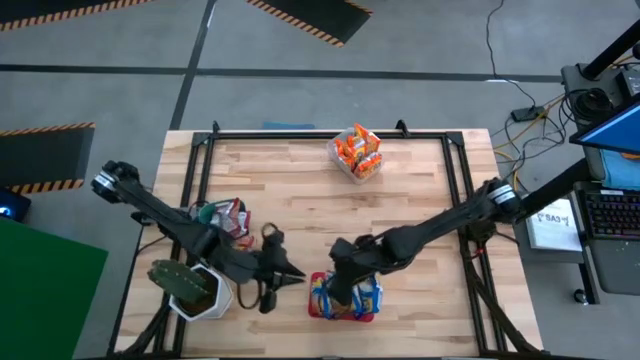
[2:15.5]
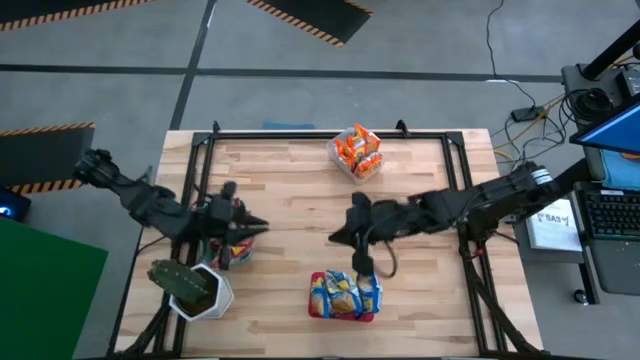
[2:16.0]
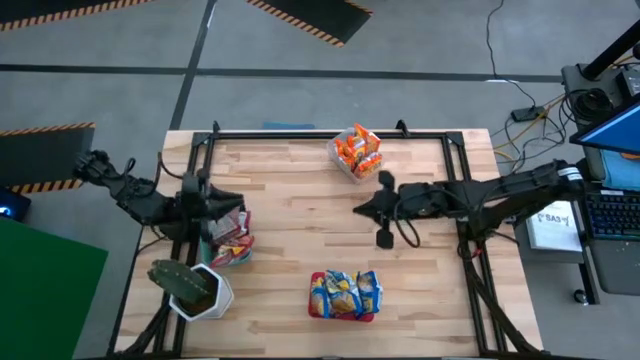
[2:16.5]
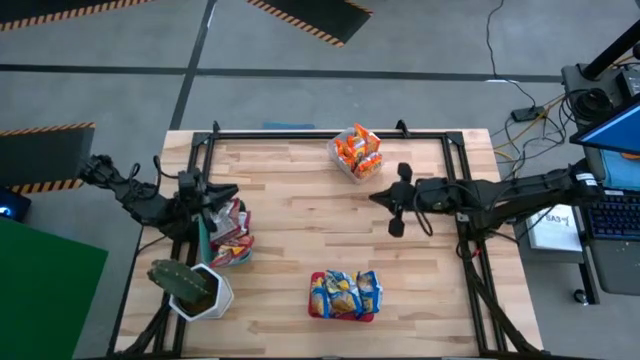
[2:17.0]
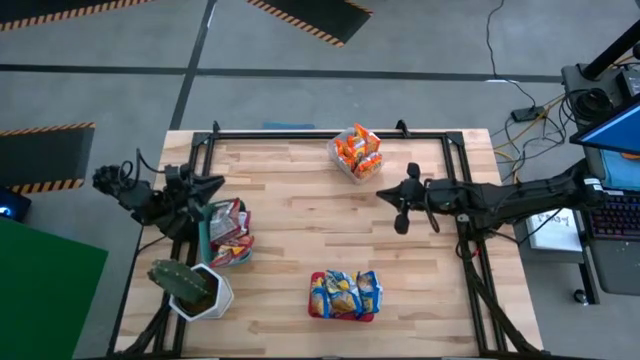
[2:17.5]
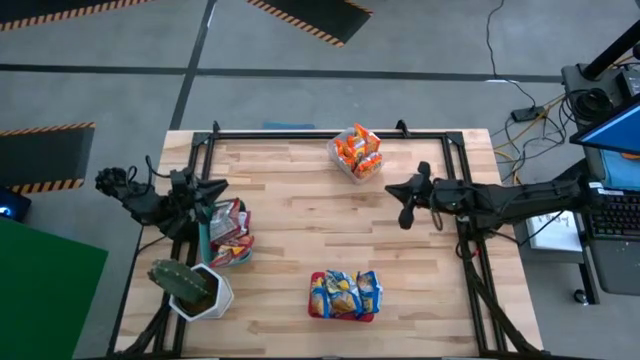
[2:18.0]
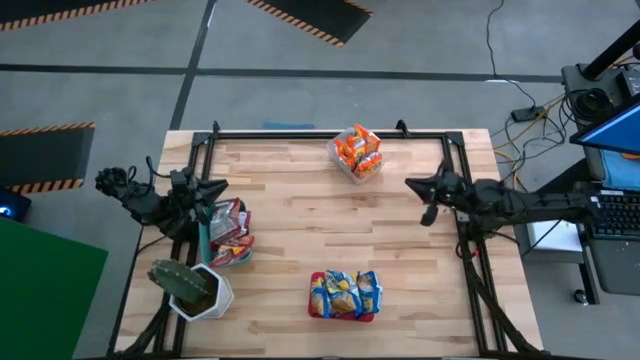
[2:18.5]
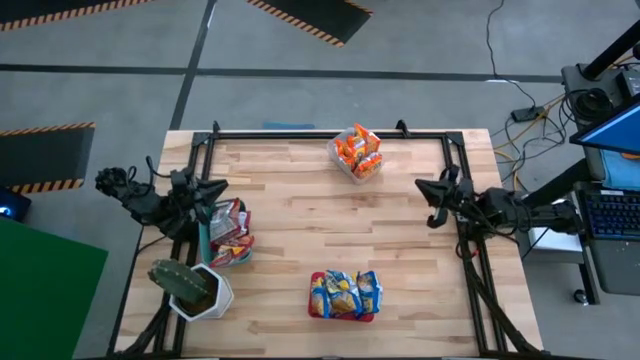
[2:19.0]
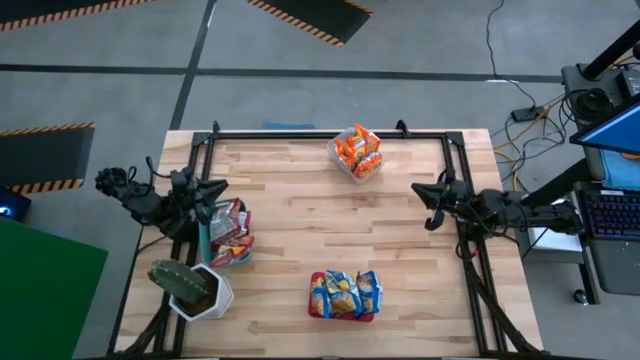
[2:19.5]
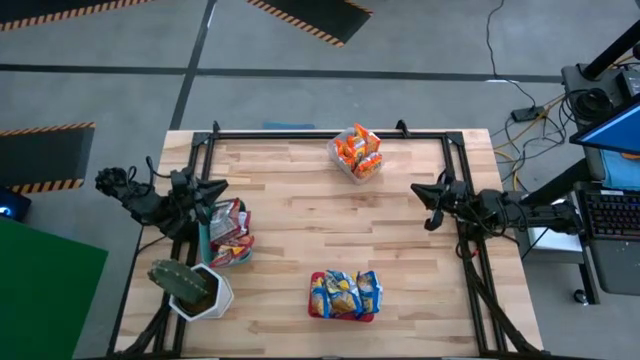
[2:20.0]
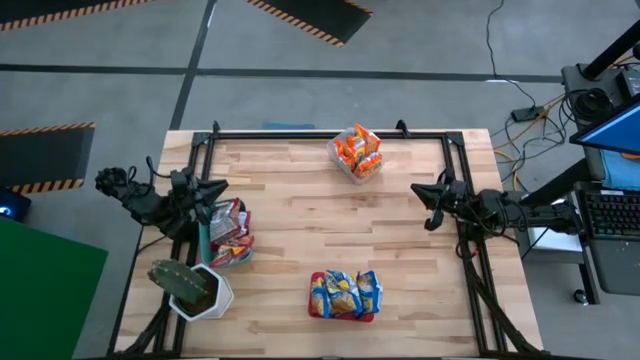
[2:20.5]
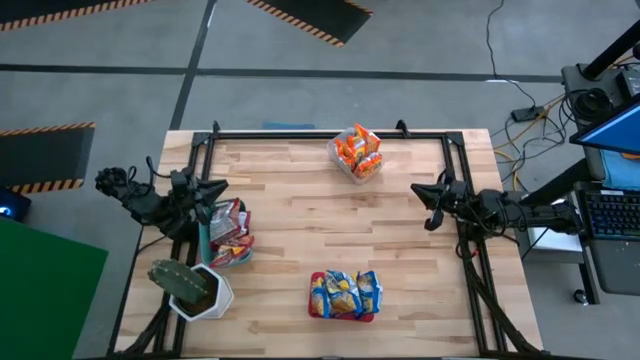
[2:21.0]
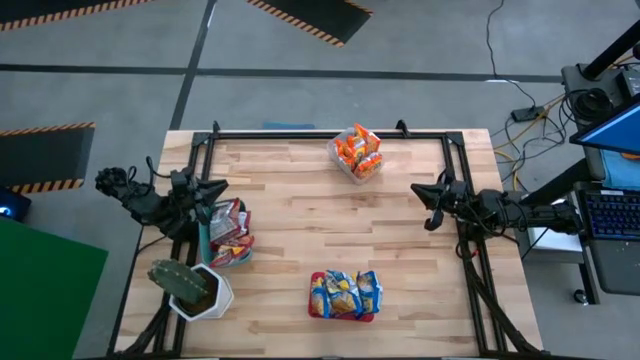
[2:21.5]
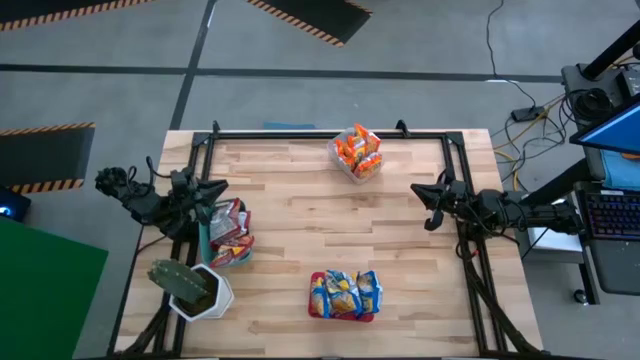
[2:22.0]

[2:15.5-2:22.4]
Task: Sort Maruchan noodles
Return to Home Position

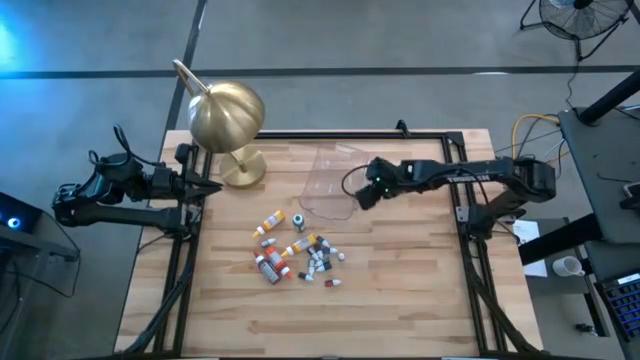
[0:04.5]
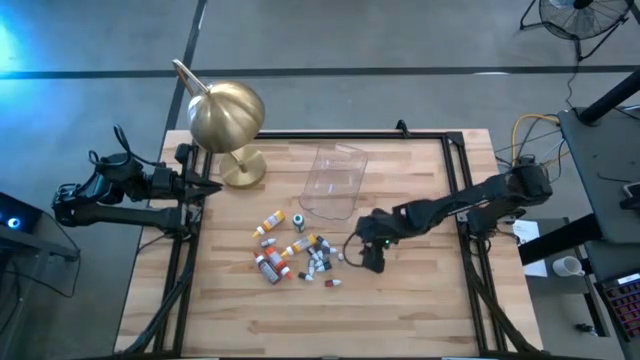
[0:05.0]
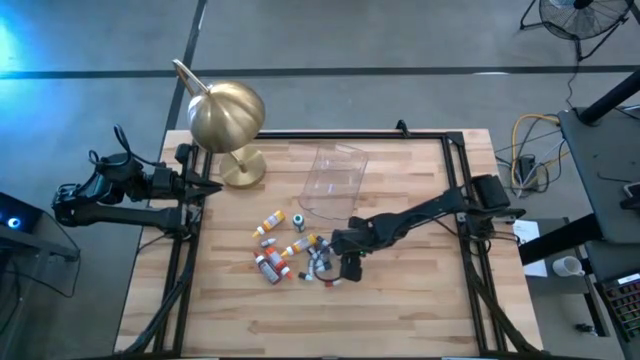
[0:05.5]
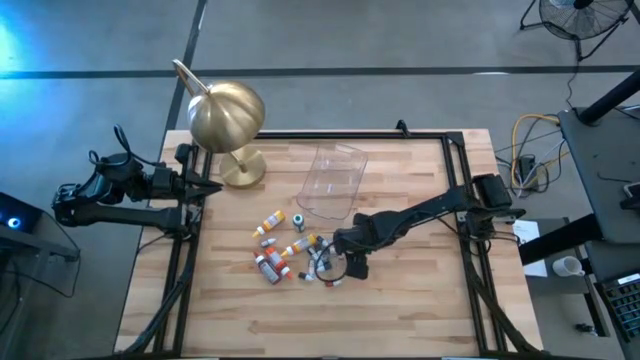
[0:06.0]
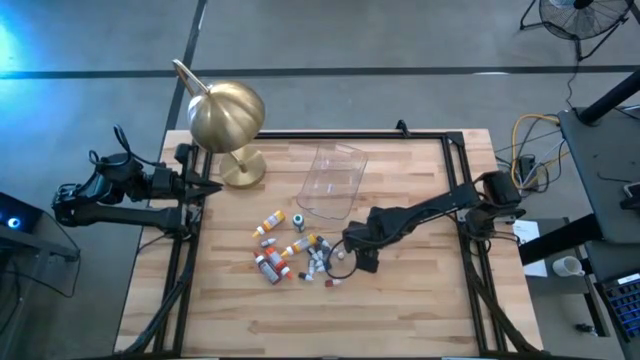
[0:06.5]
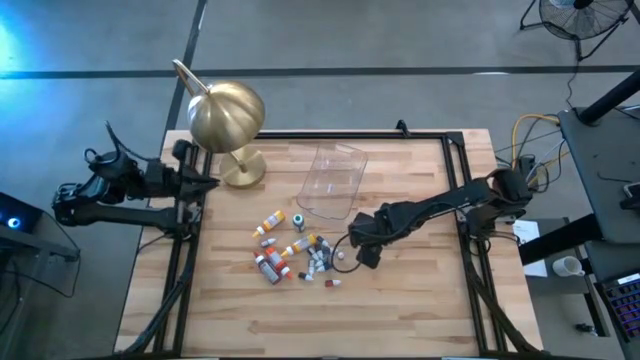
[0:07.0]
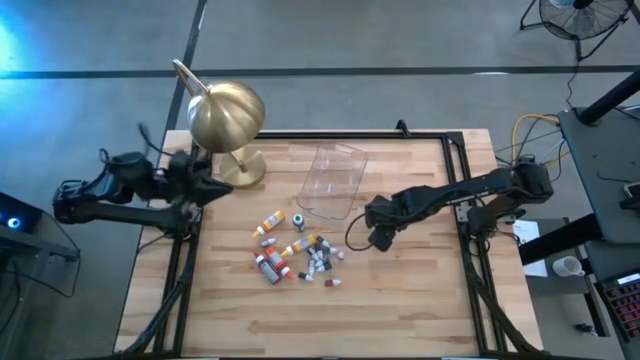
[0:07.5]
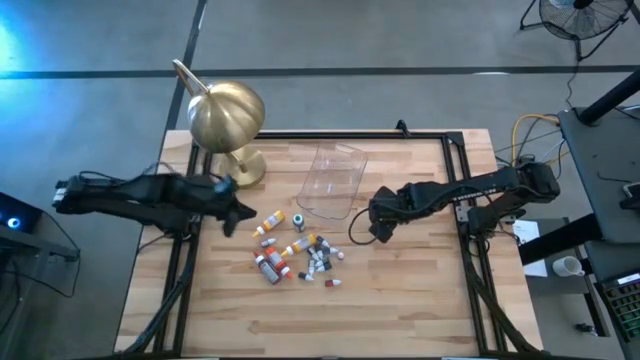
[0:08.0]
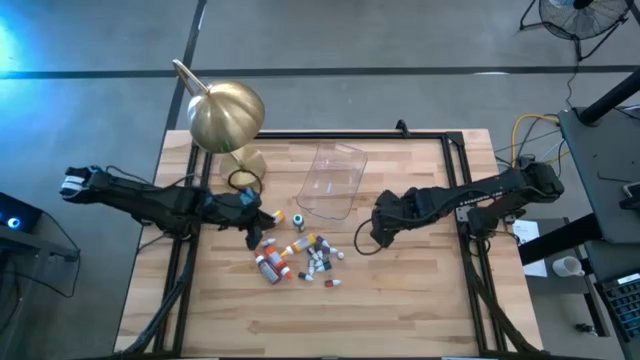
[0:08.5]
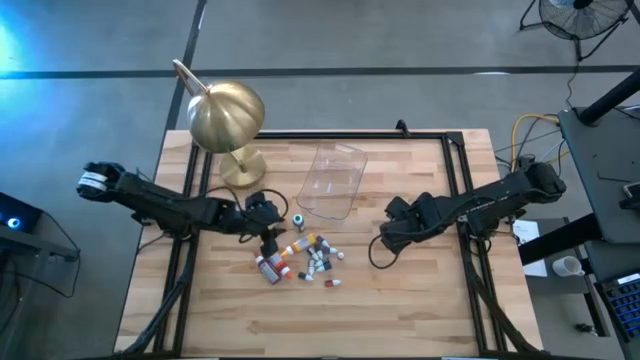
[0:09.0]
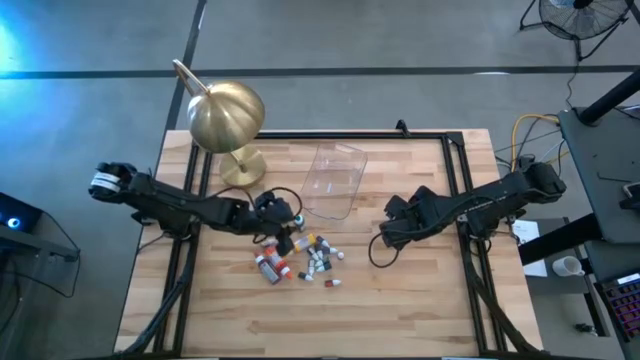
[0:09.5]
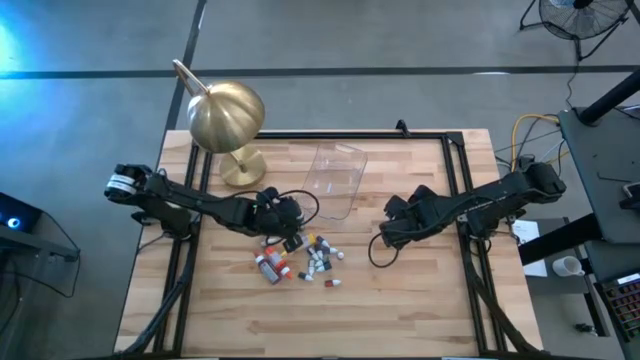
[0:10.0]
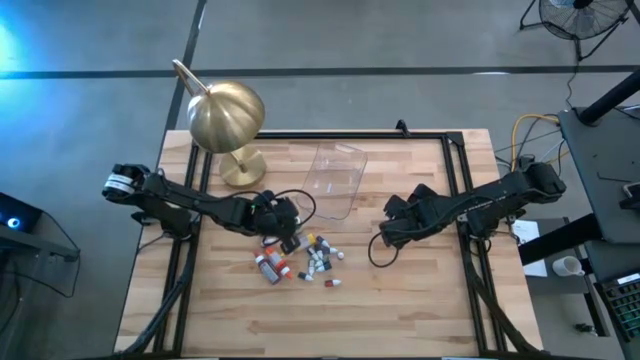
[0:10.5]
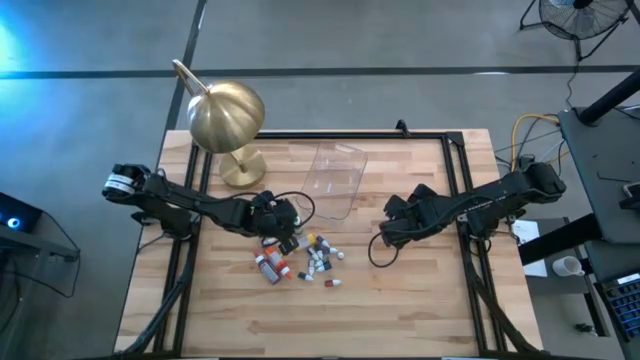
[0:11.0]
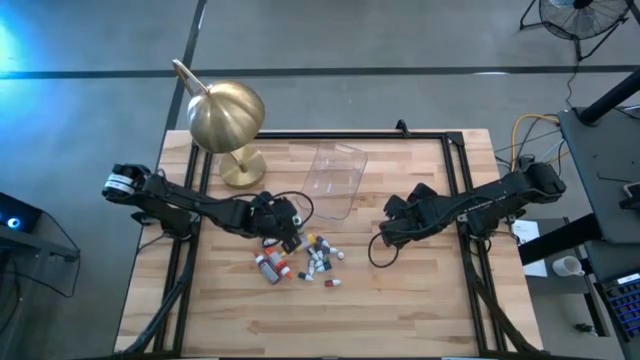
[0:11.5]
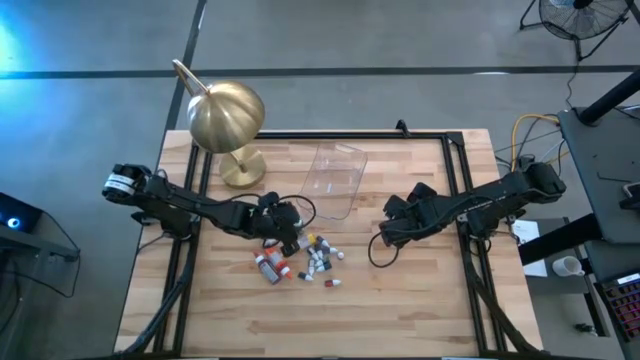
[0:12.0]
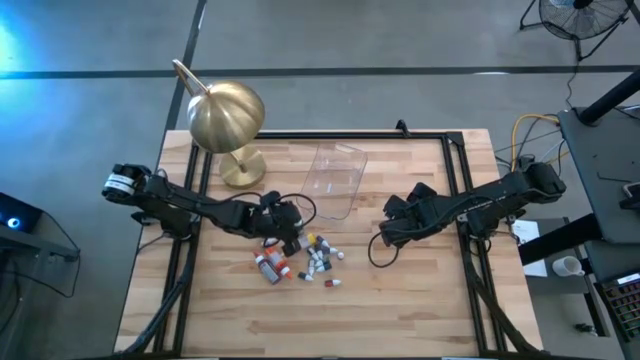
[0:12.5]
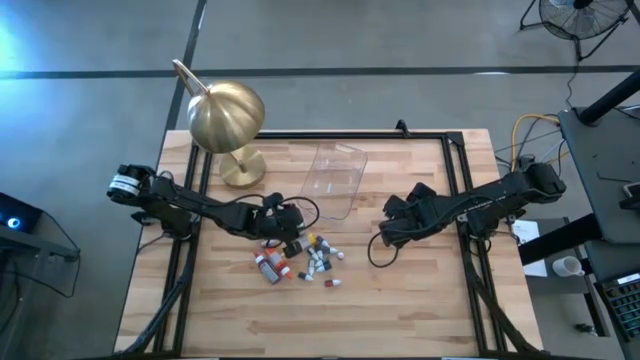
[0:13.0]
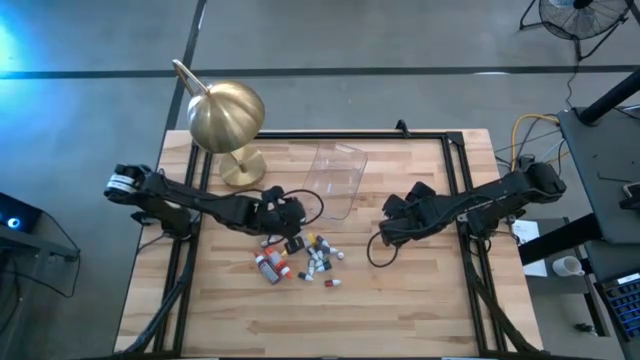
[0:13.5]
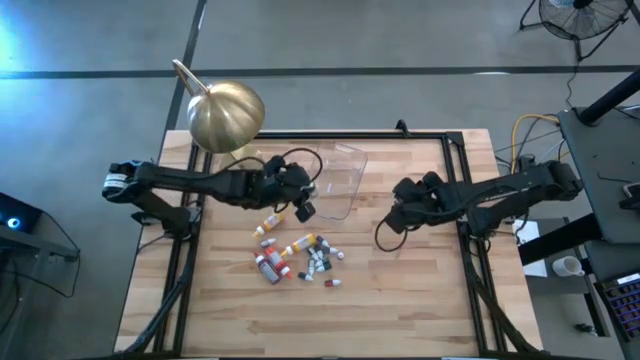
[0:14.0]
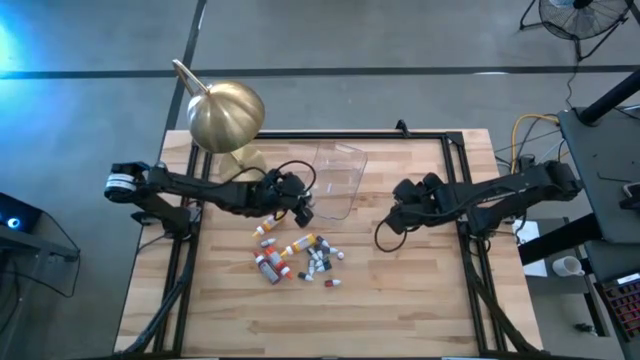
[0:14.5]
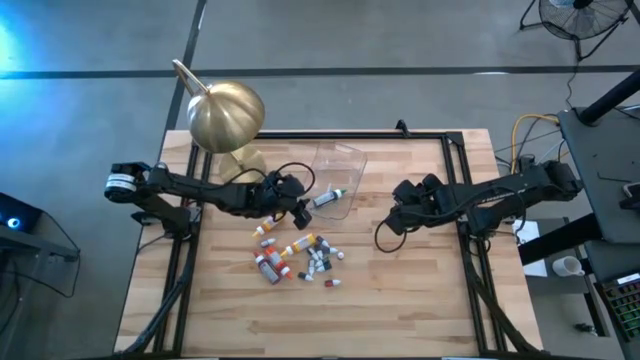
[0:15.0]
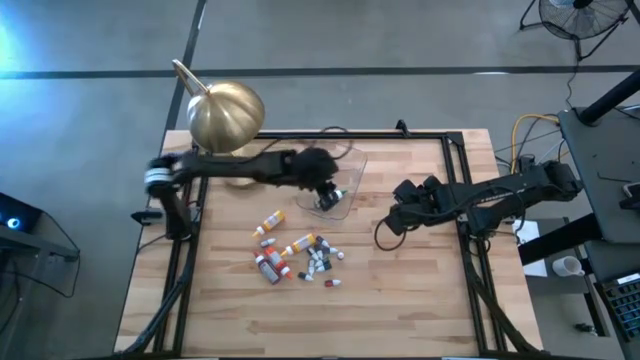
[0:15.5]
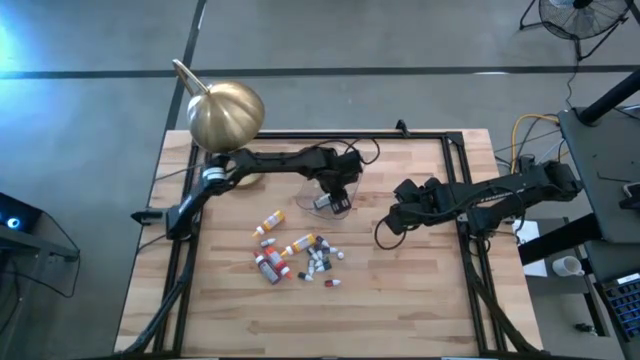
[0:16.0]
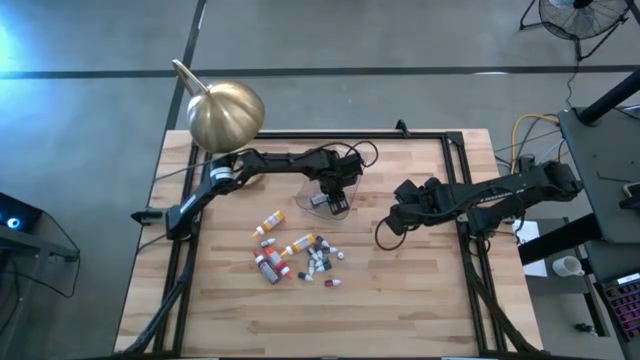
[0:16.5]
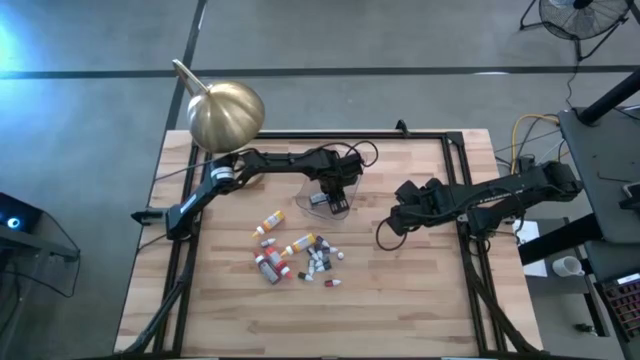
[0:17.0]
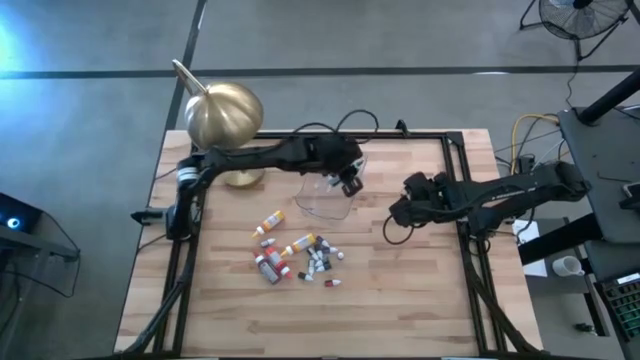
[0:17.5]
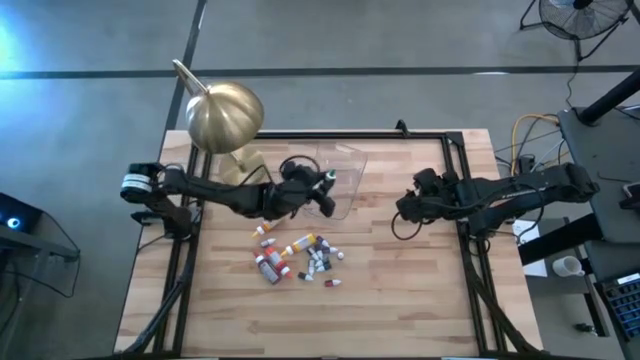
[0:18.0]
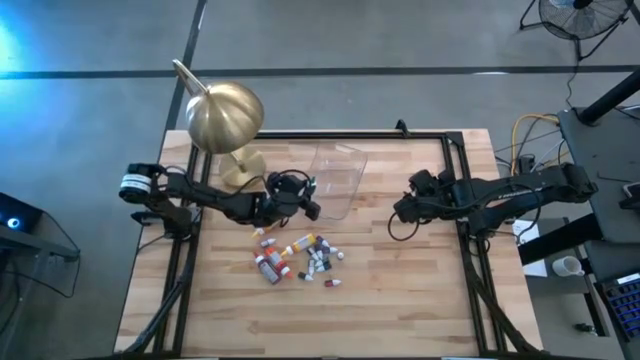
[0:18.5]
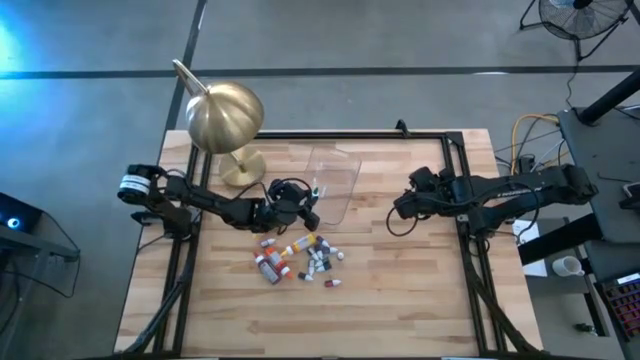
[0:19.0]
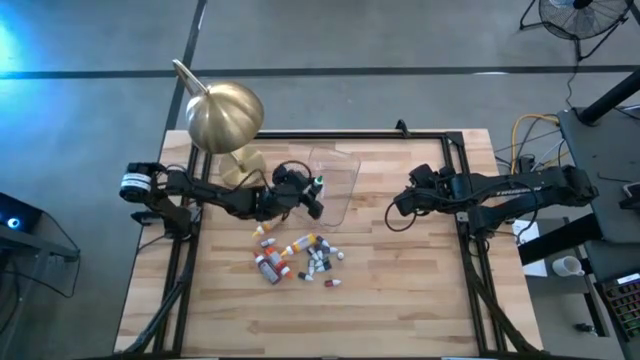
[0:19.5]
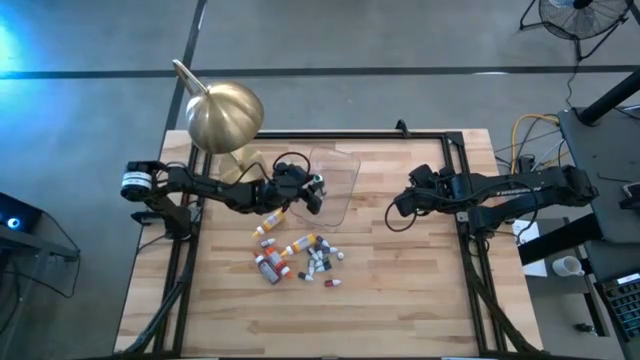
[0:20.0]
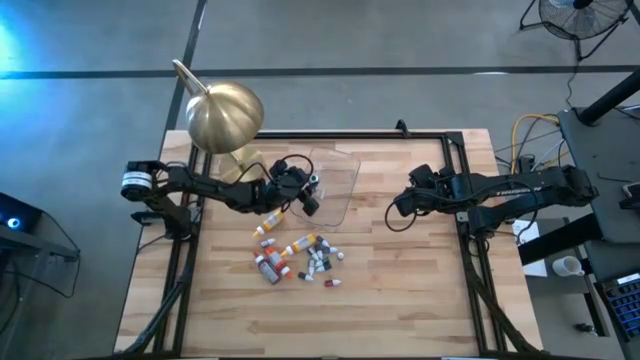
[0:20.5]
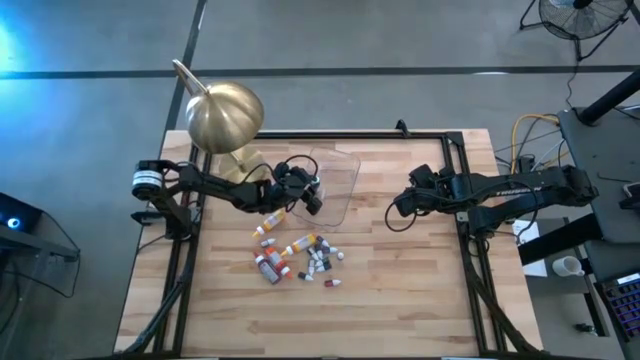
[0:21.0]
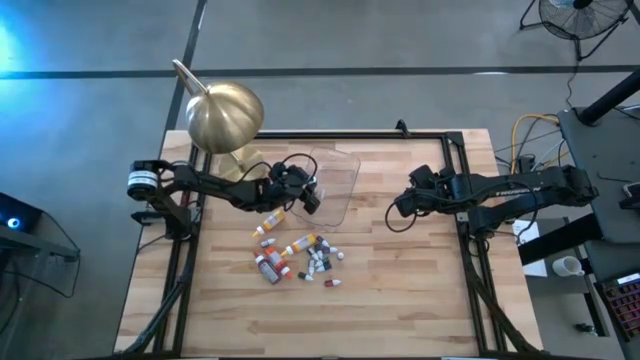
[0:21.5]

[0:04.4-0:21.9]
Task: Pick & Place food coloring
Put the large green food coloring bottle into the transparent bin
